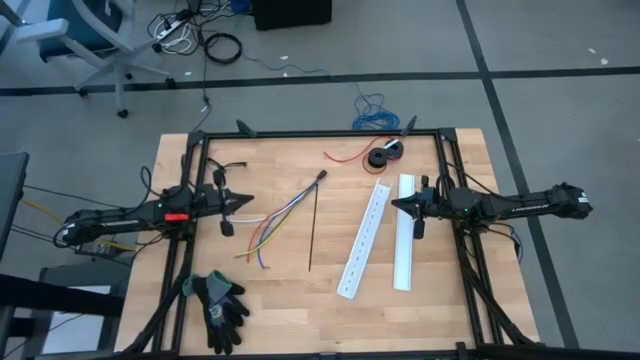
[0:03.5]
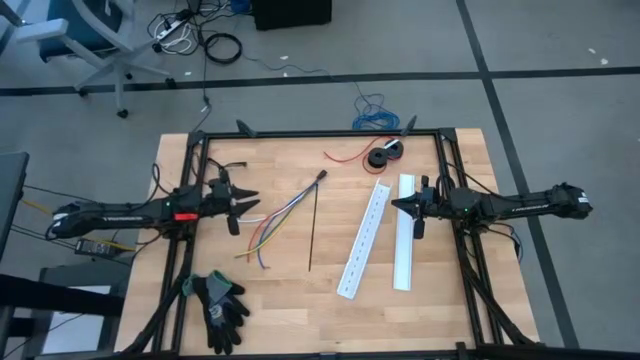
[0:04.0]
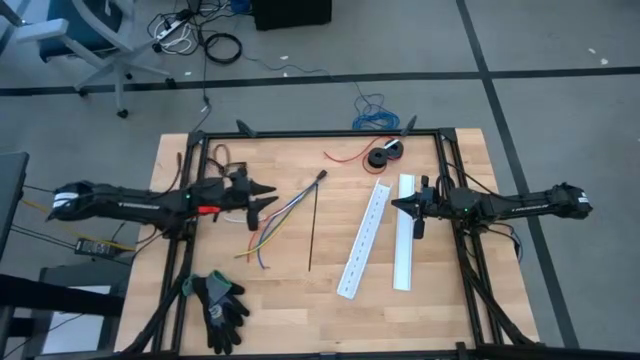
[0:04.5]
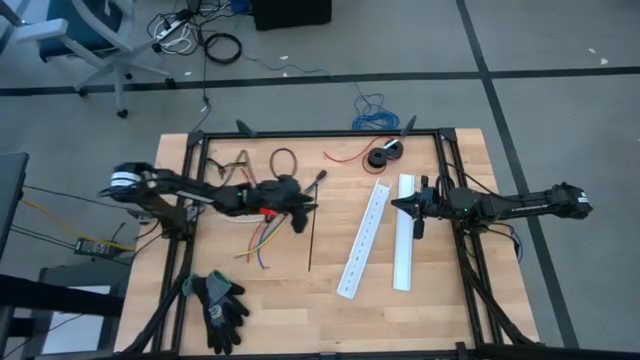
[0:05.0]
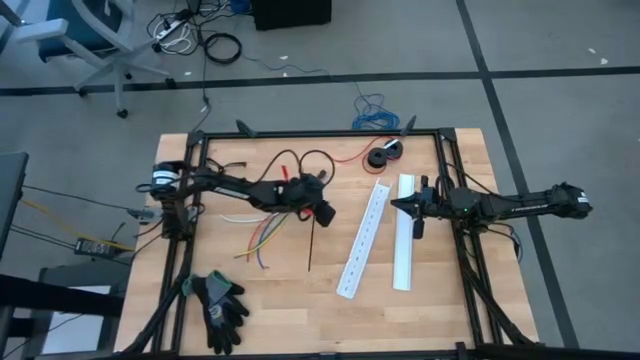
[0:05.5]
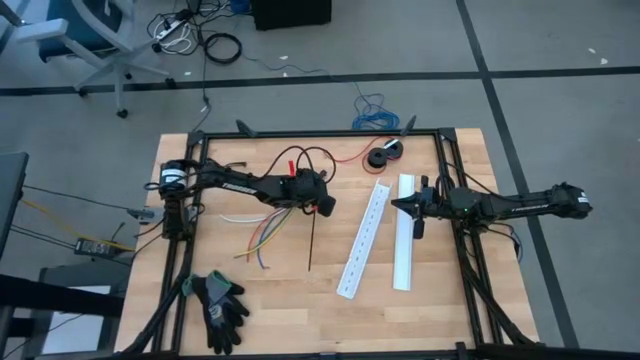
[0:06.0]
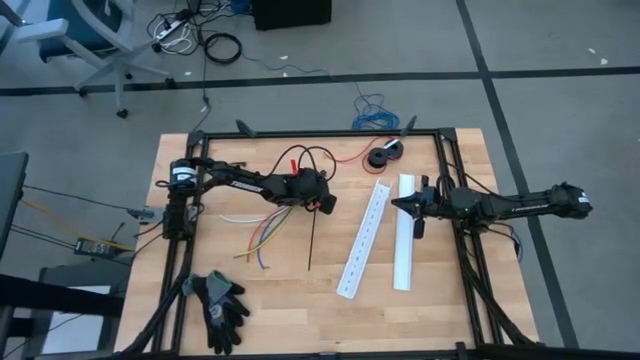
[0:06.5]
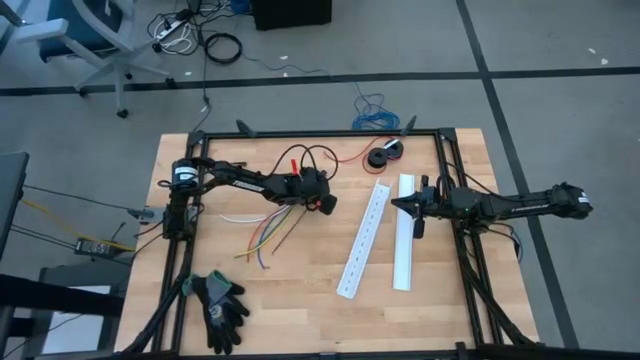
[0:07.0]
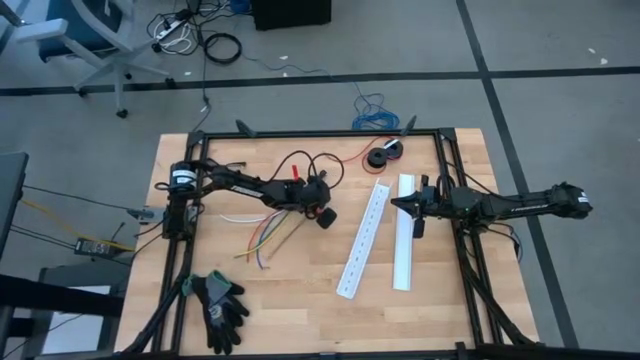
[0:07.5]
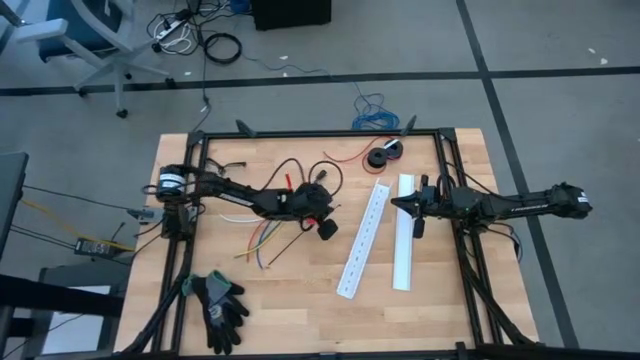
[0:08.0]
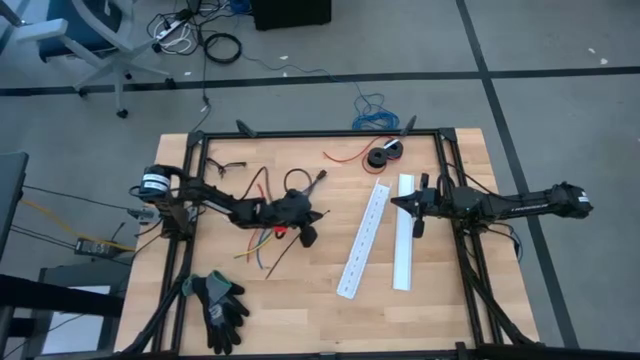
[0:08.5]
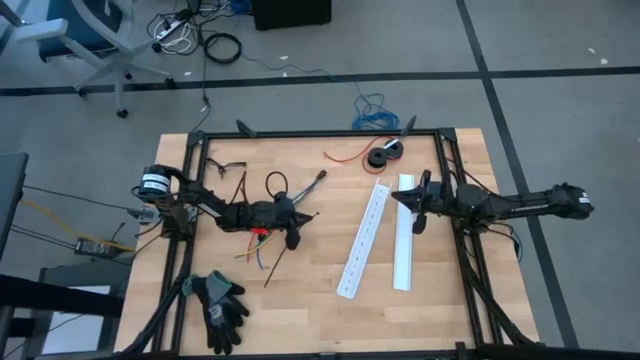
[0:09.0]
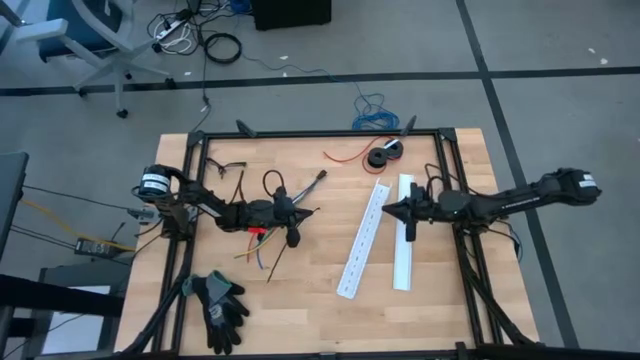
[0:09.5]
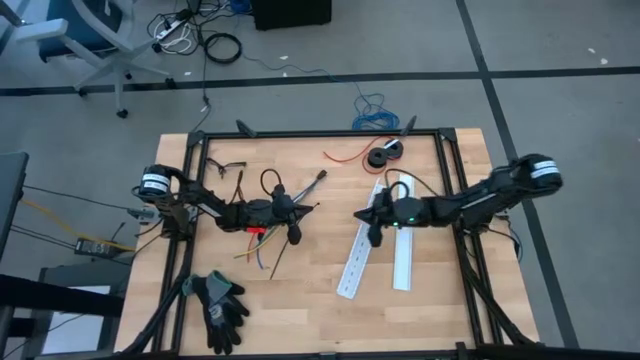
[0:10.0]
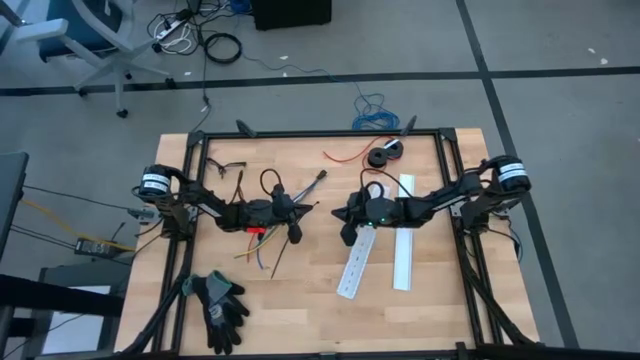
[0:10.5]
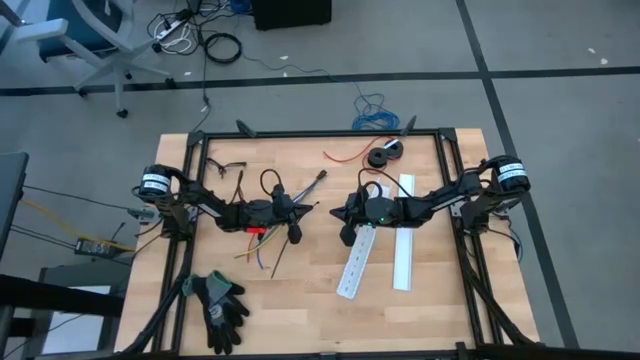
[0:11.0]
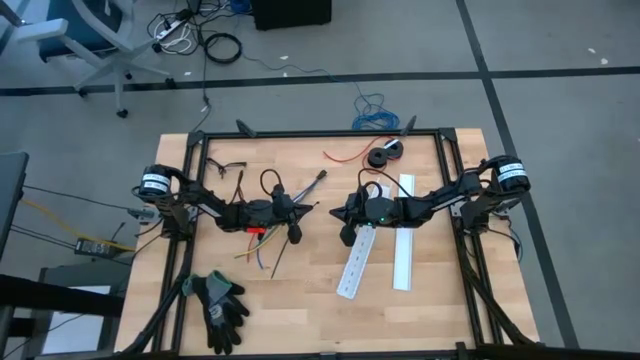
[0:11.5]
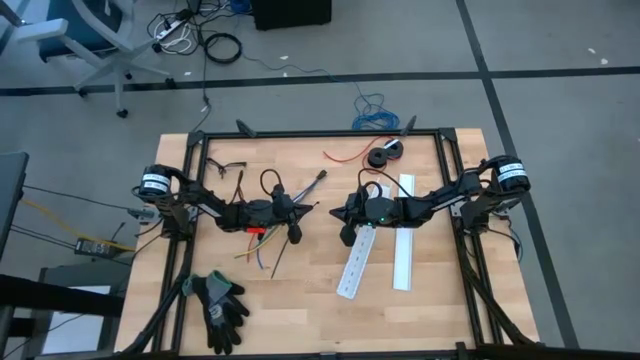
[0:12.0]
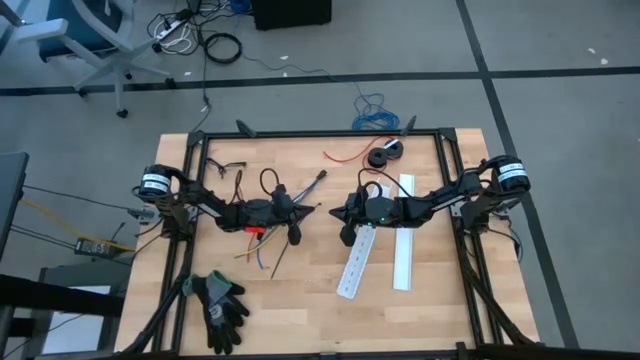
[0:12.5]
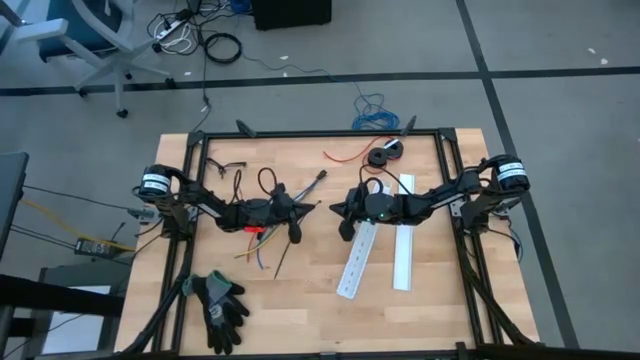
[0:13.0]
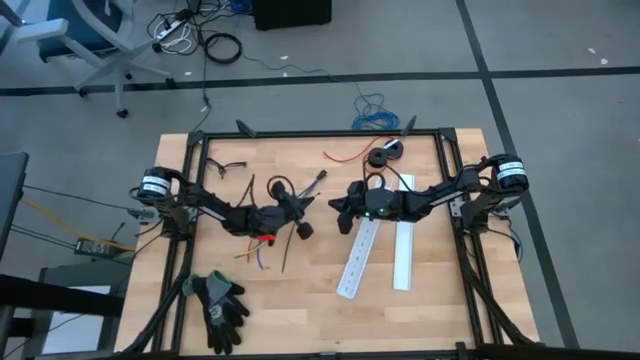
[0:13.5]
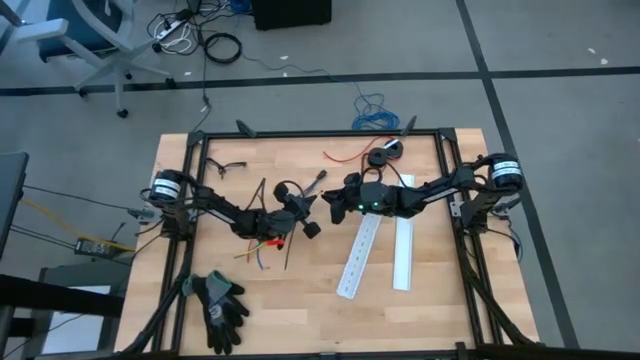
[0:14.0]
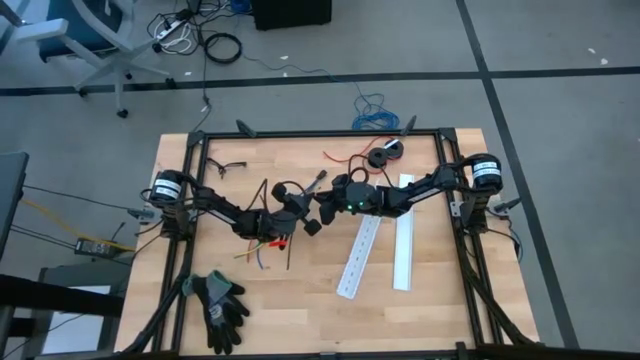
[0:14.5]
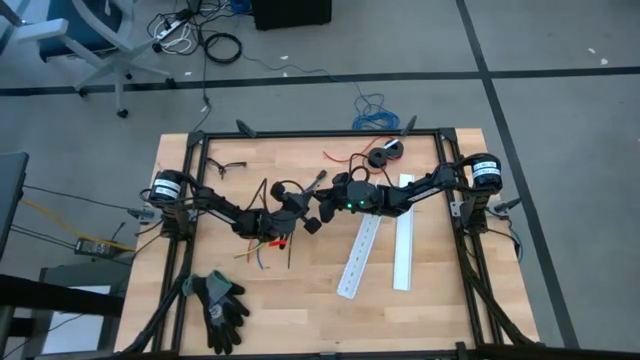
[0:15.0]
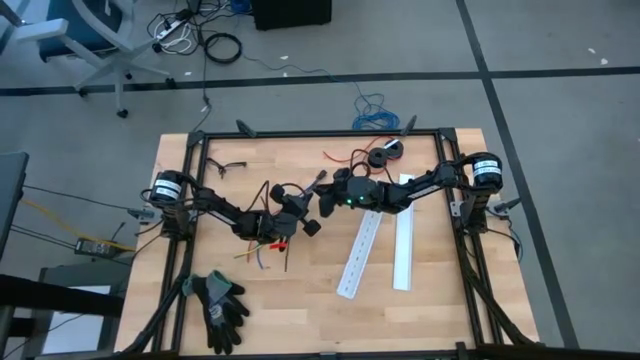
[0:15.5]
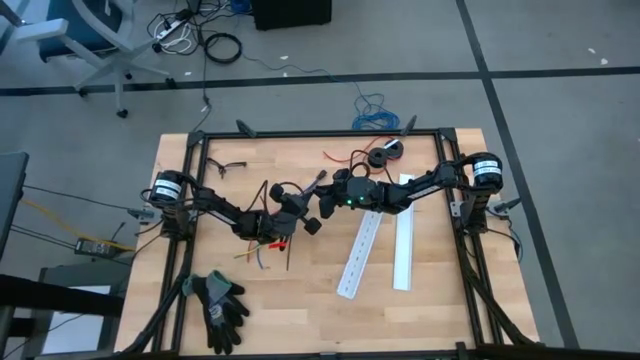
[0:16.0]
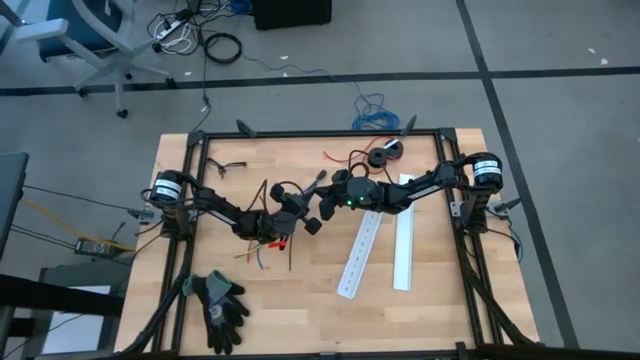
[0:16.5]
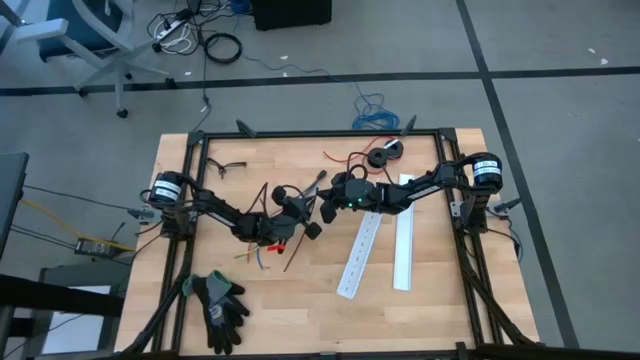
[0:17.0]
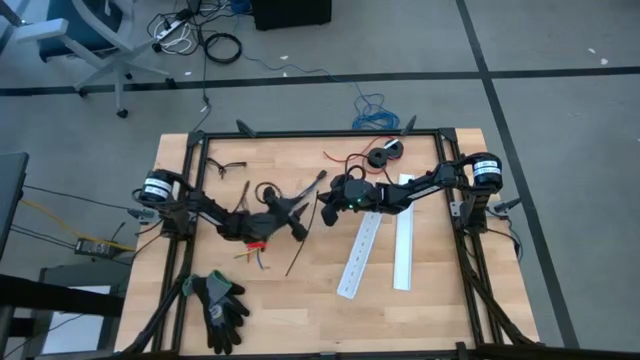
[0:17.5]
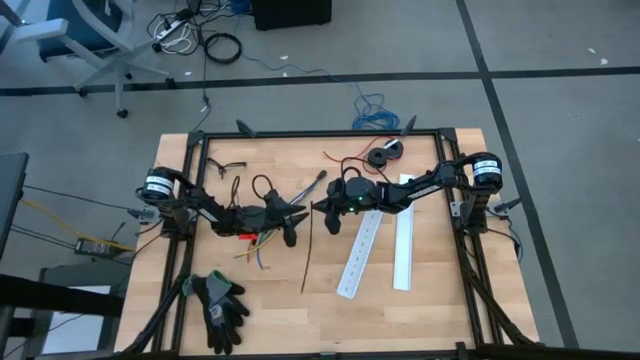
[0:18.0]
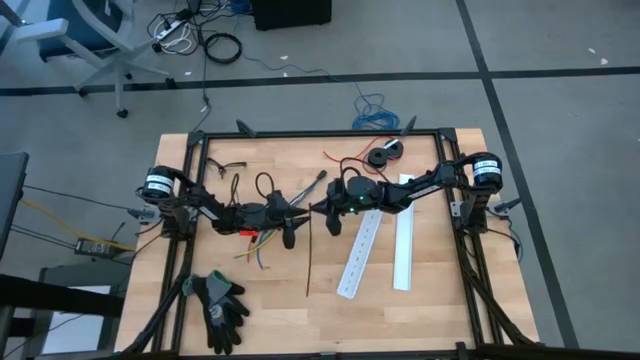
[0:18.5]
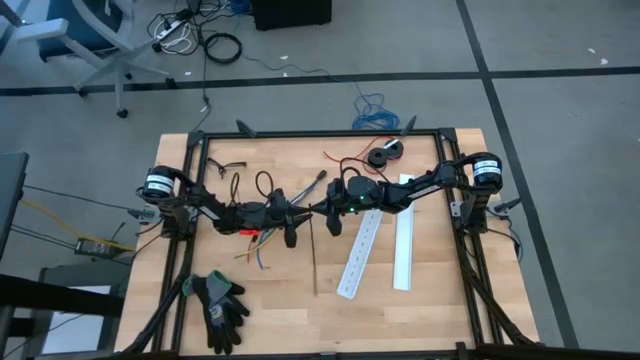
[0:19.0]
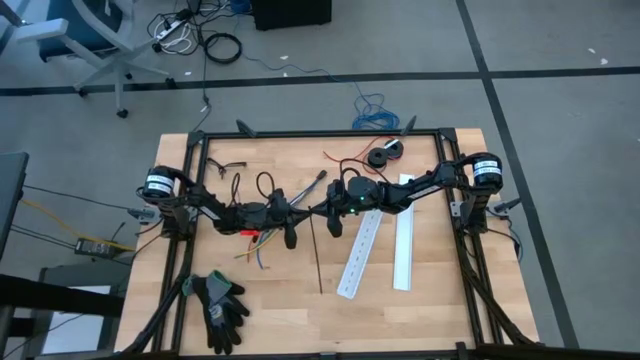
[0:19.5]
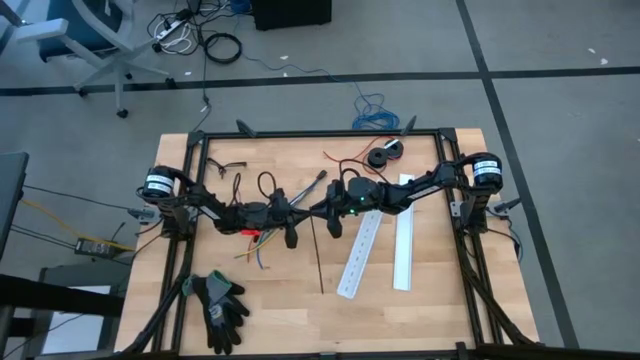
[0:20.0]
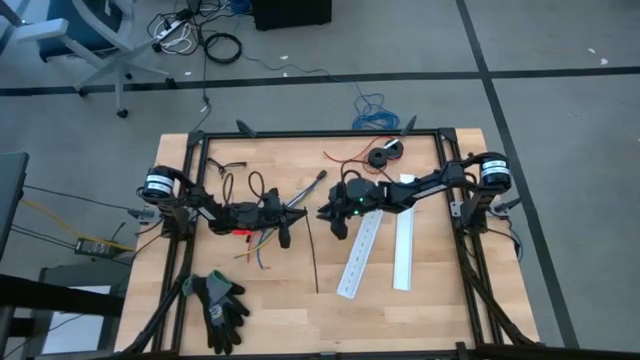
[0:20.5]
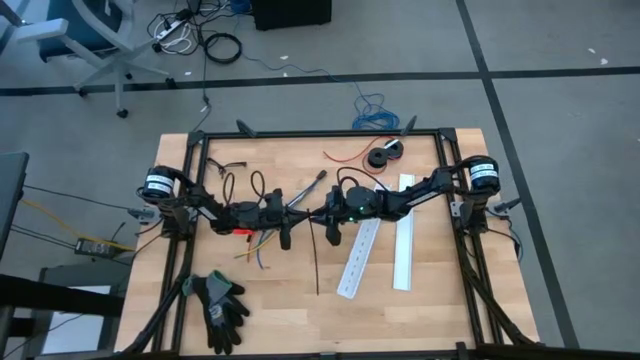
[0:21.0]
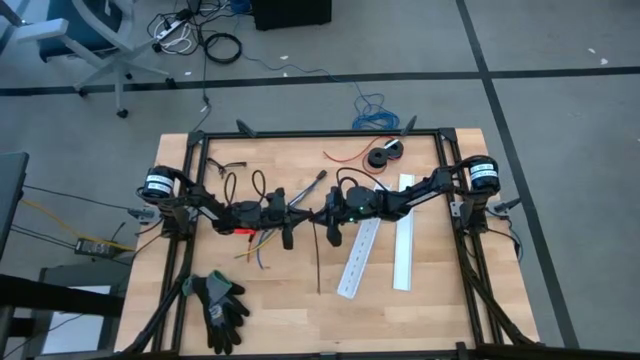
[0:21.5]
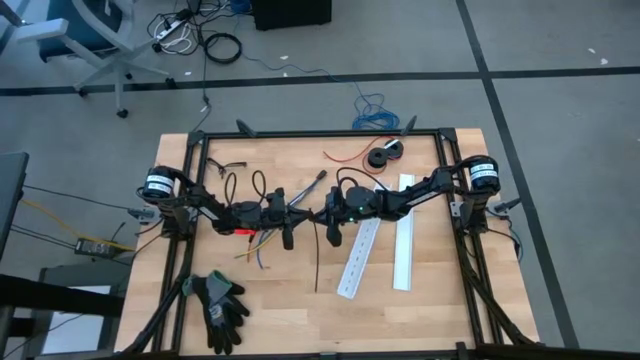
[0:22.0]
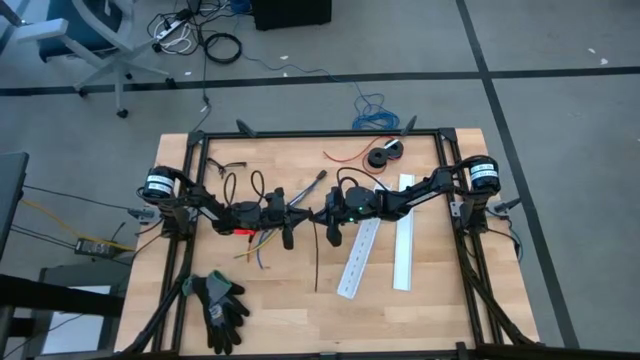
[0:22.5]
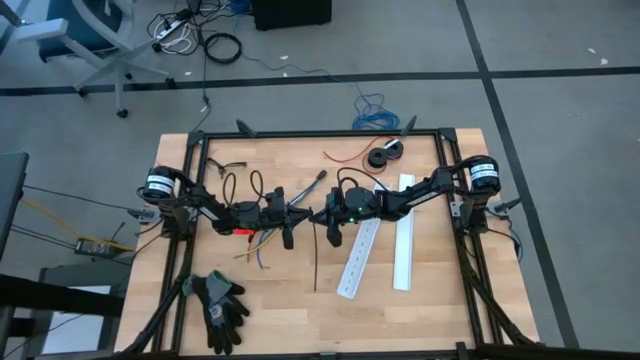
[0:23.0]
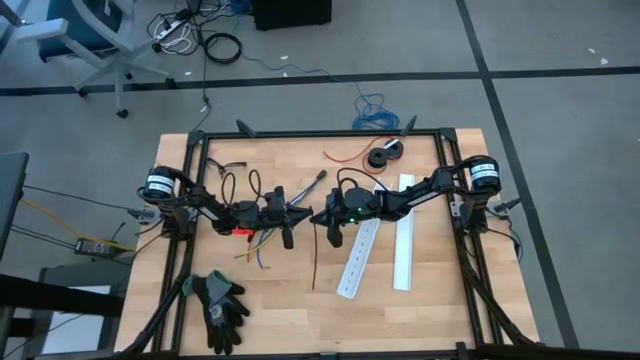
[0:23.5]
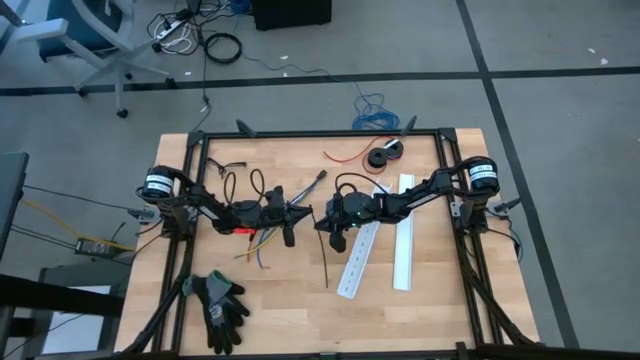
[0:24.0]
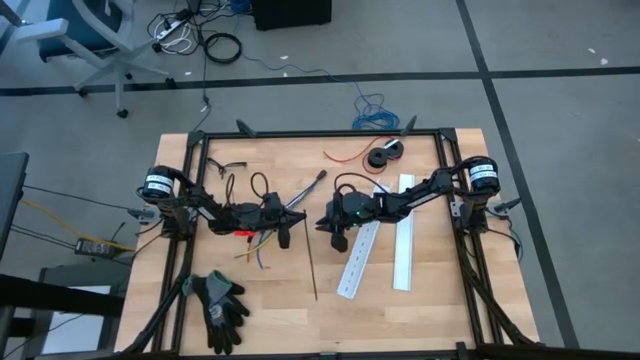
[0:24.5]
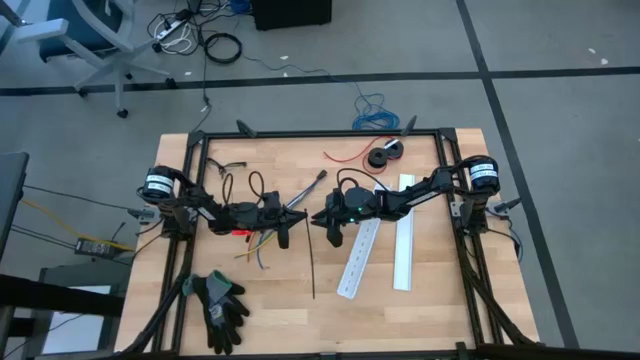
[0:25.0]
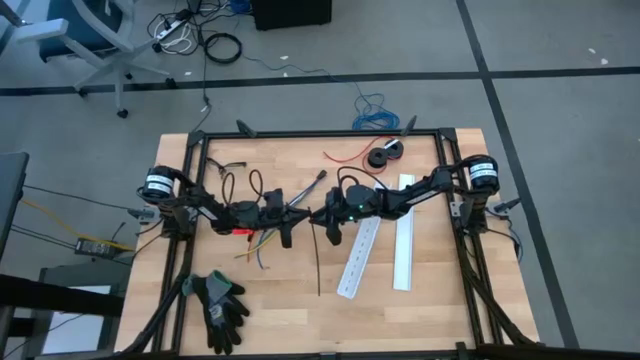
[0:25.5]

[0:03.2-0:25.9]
Task: Ziptie cables
Wrap the cable wires with the black zip tie
